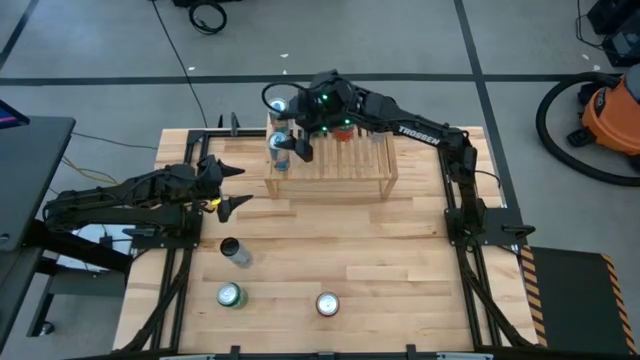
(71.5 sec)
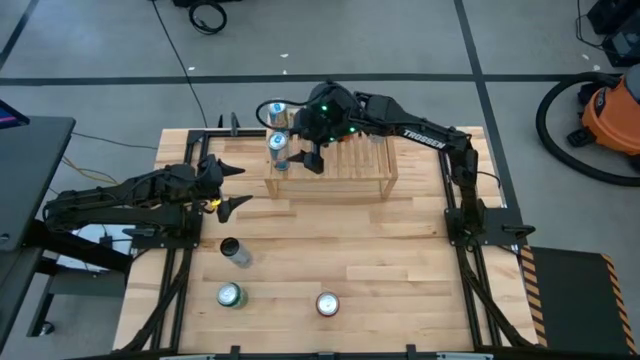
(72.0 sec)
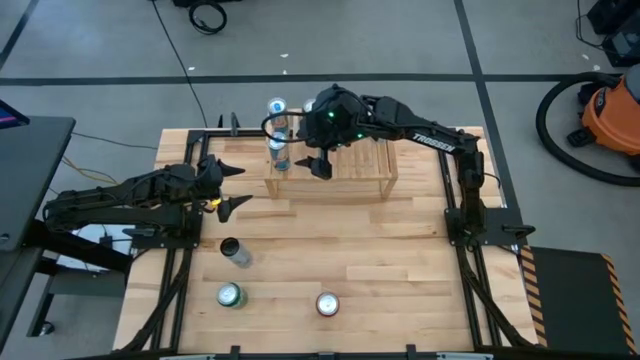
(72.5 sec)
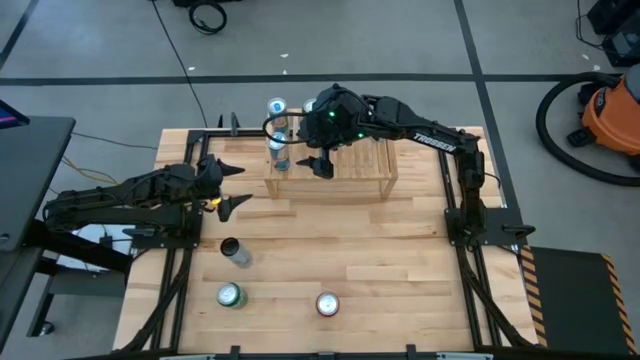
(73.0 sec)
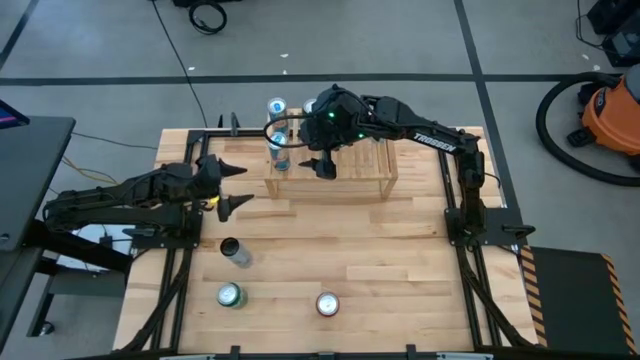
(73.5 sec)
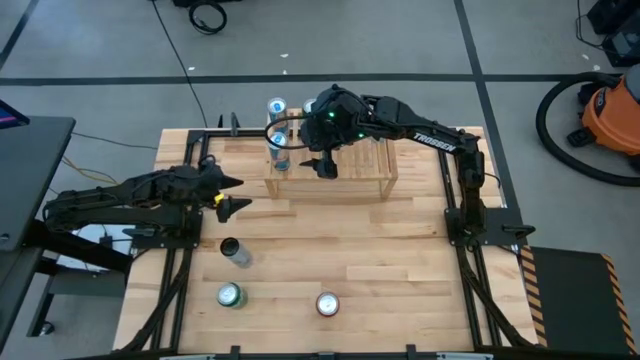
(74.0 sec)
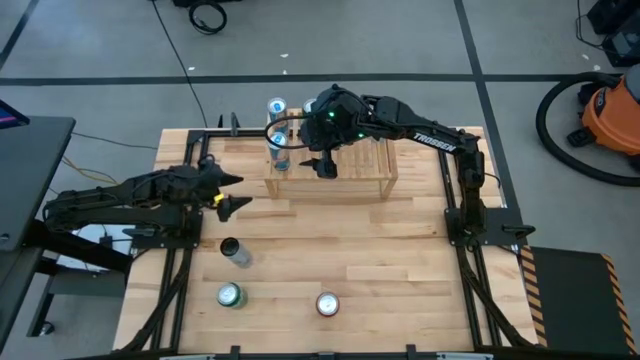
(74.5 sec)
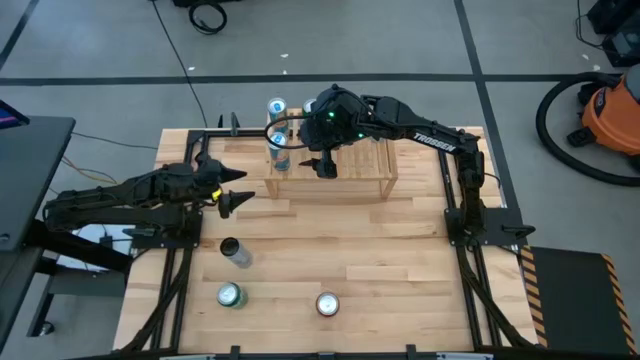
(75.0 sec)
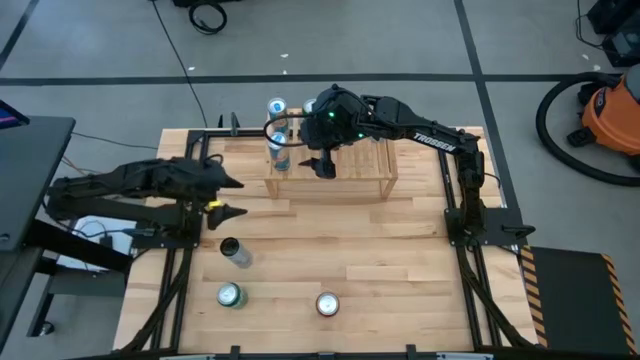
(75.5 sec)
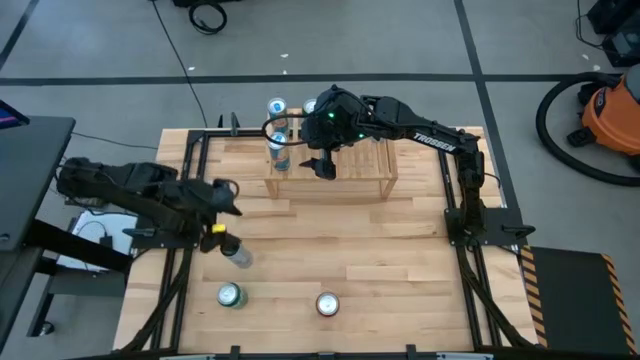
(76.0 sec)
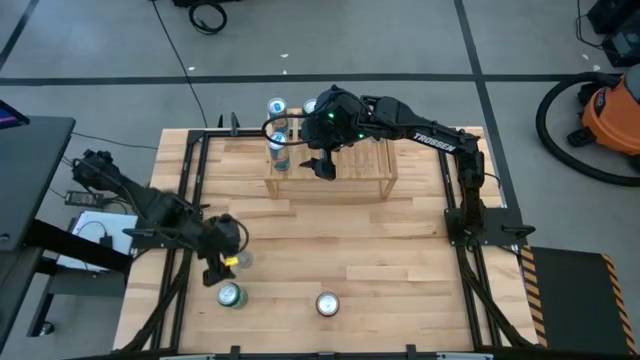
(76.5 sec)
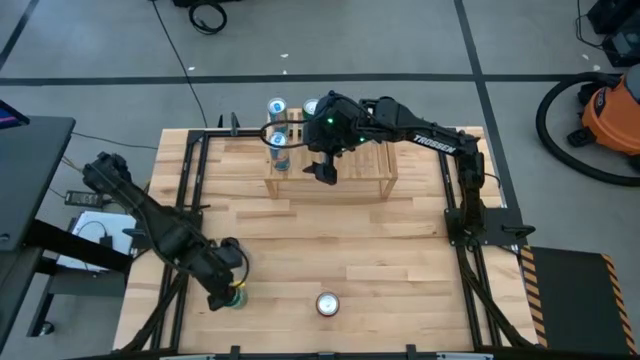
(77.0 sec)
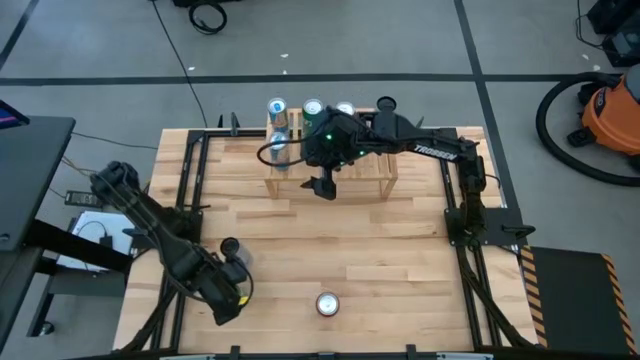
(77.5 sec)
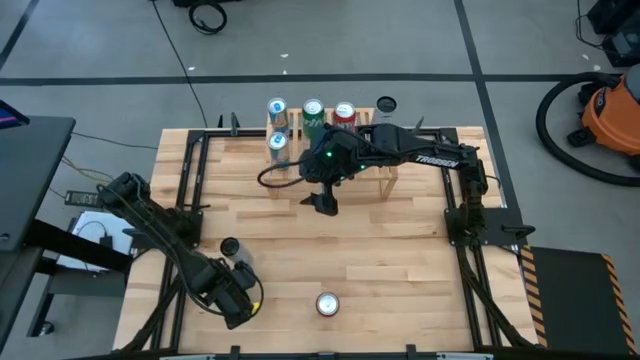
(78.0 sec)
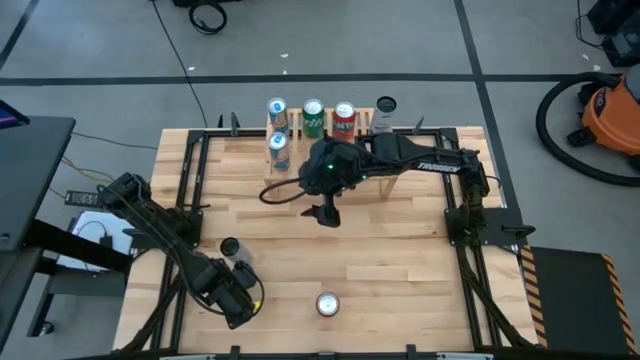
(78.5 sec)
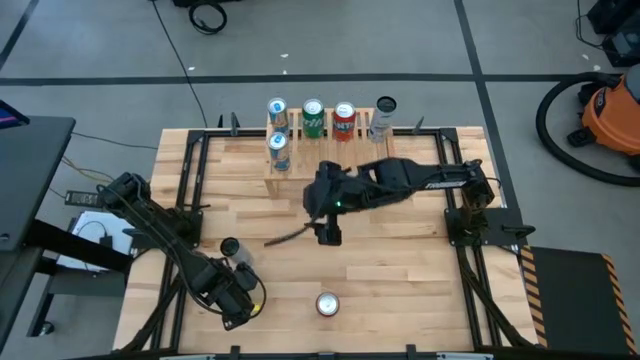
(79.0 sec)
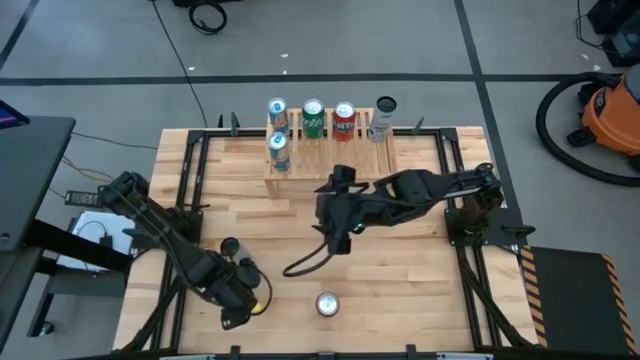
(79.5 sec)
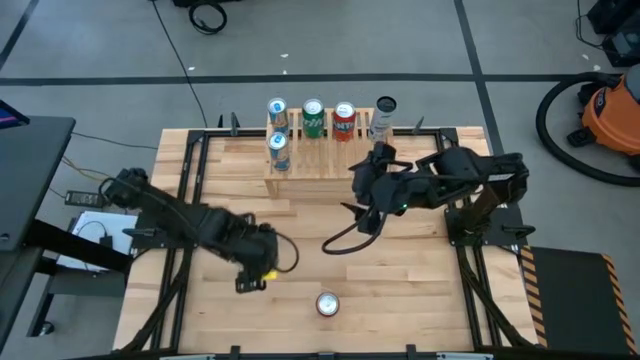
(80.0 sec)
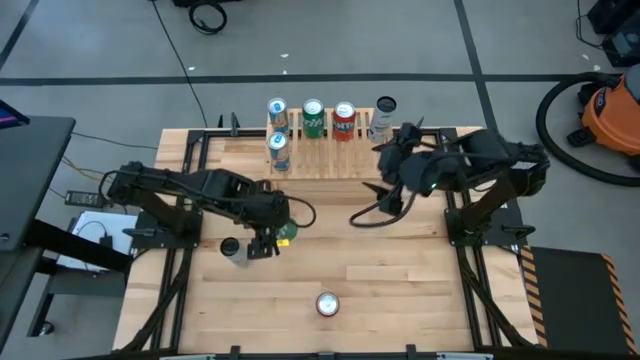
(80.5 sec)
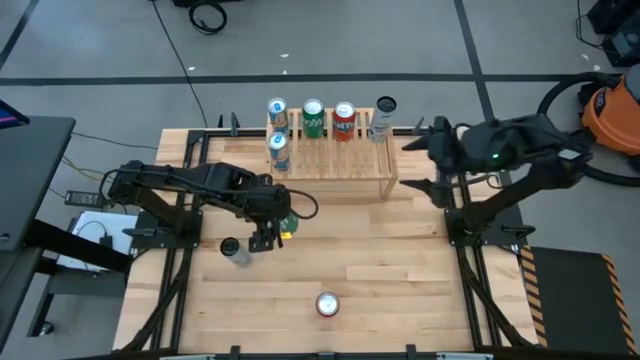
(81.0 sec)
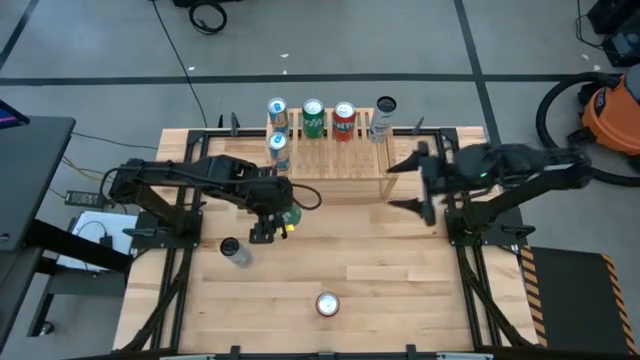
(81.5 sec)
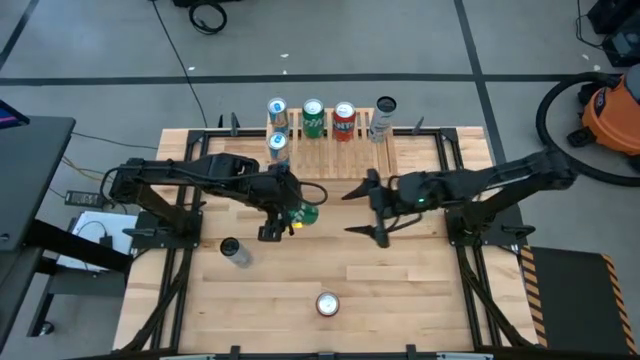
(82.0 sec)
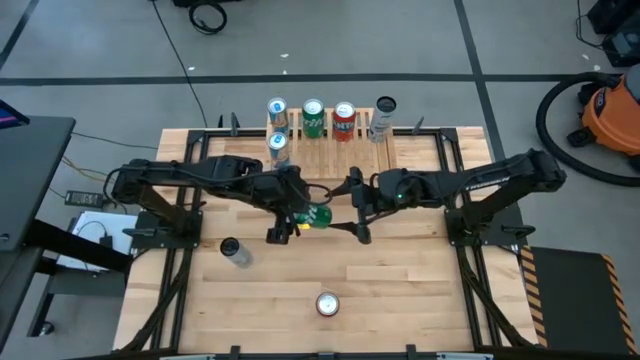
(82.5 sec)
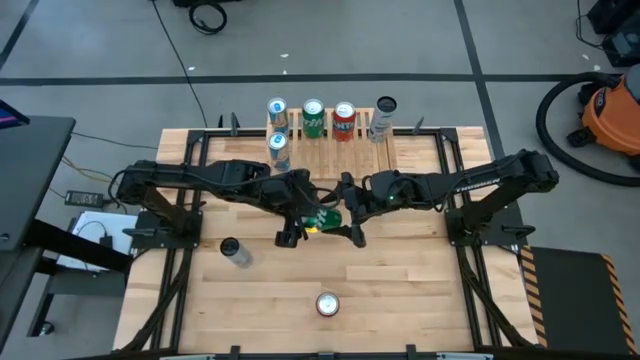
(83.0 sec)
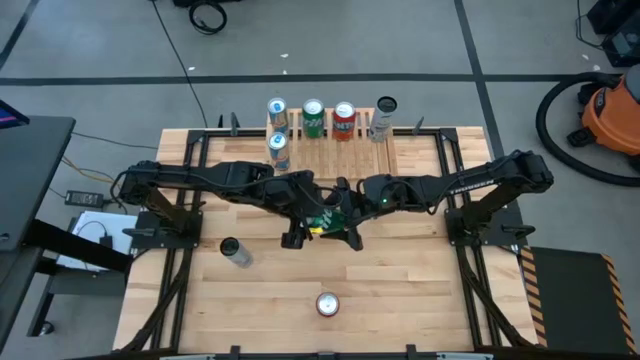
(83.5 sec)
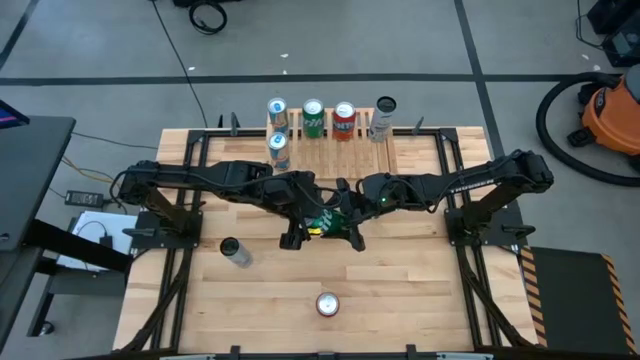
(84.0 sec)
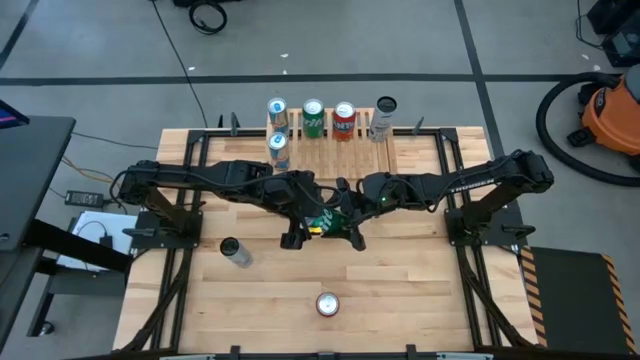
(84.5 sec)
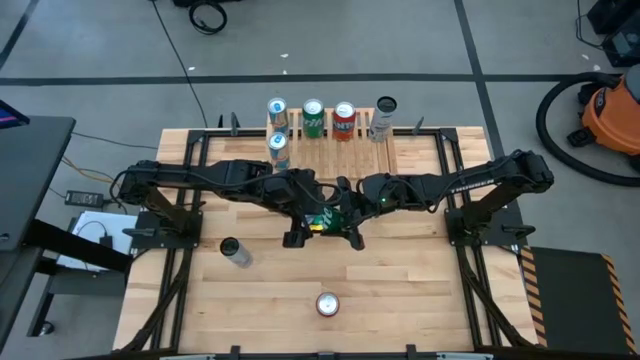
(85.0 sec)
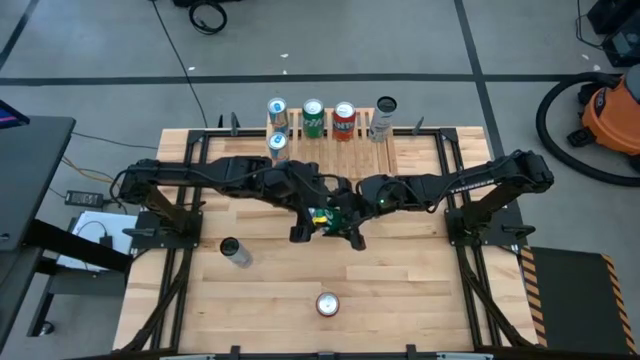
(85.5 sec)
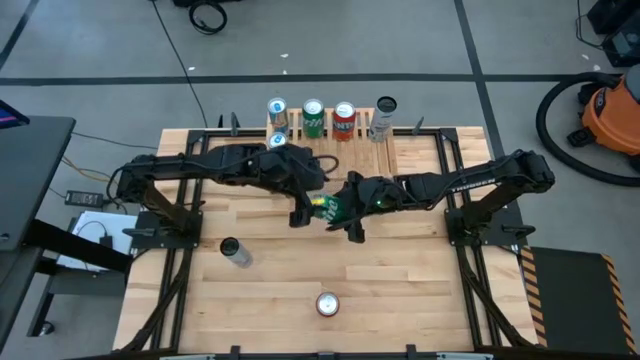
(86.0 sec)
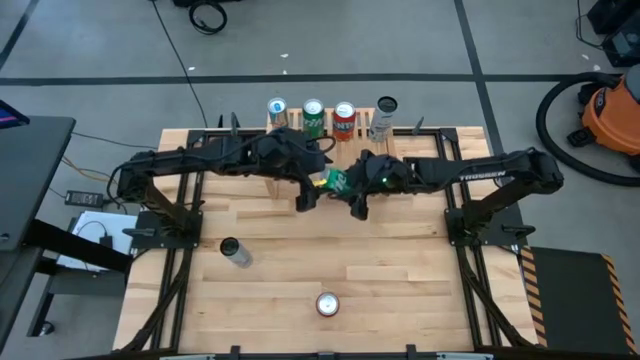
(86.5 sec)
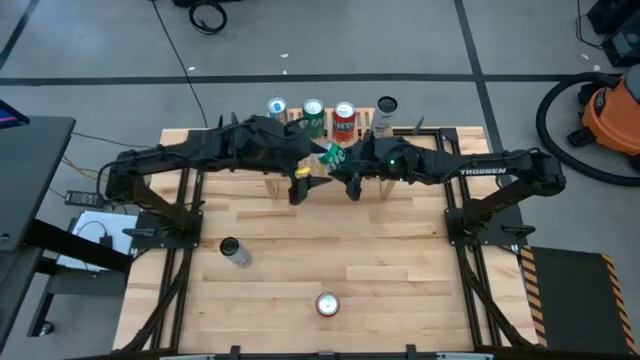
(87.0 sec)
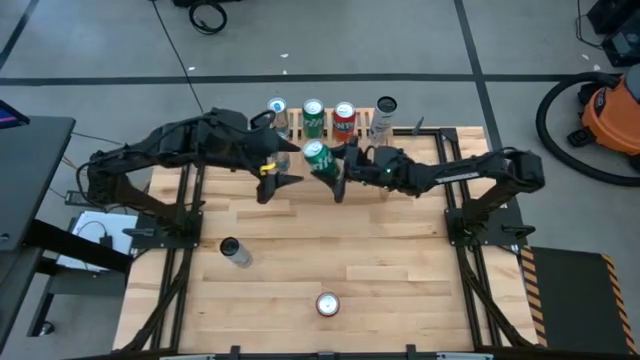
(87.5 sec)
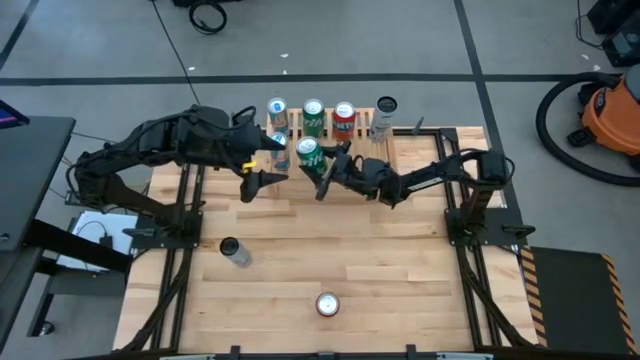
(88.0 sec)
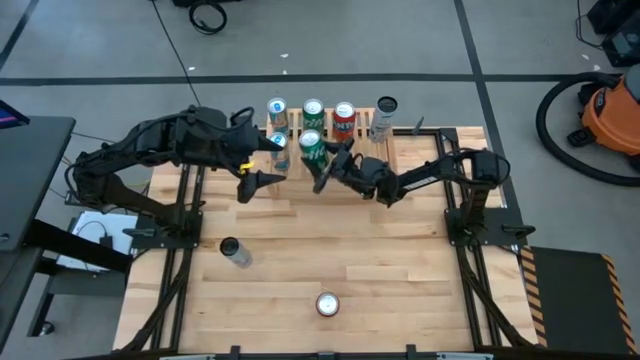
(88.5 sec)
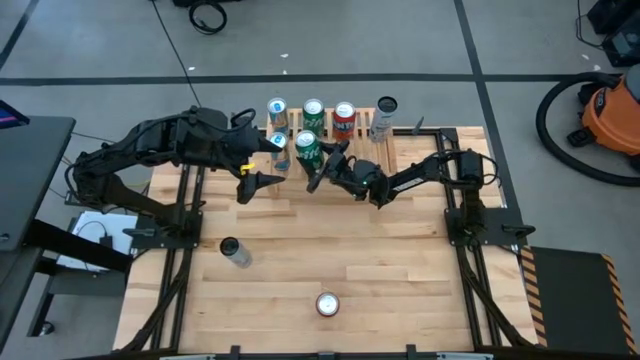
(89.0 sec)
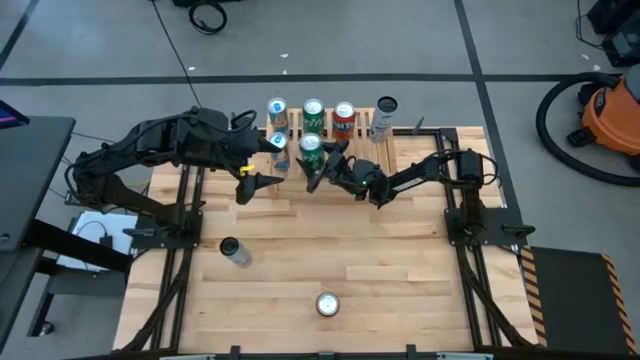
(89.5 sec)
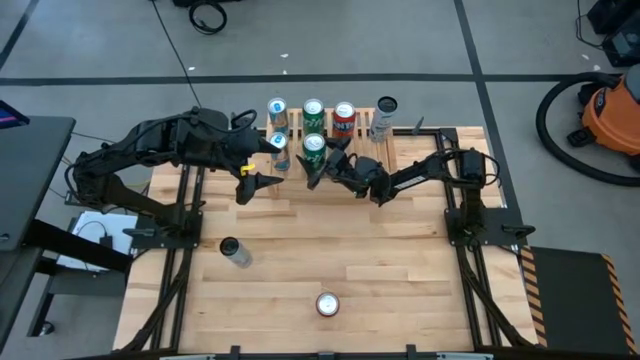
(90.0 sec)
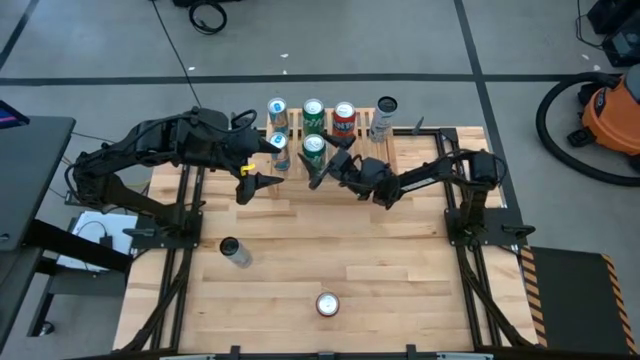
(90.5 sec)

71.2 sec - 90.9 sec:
Task: Place canned beverage on shelf
Put the green soda can on the shelf aligned with the other green soda can

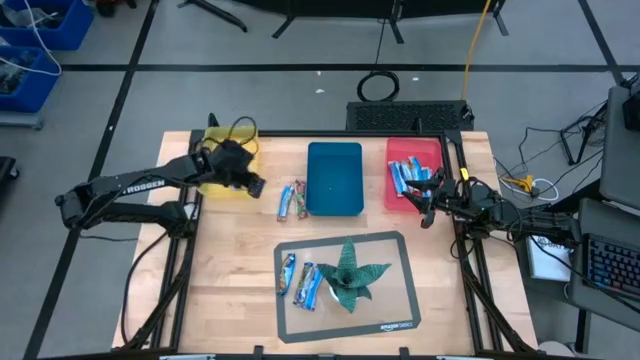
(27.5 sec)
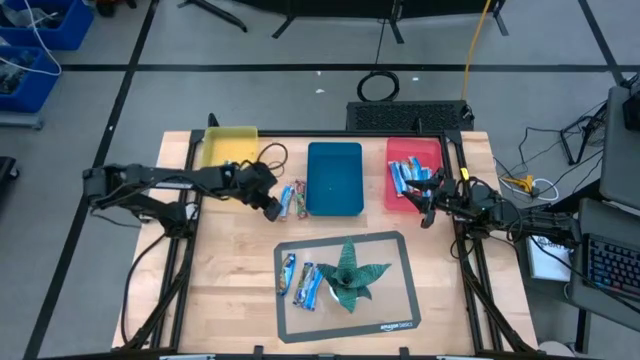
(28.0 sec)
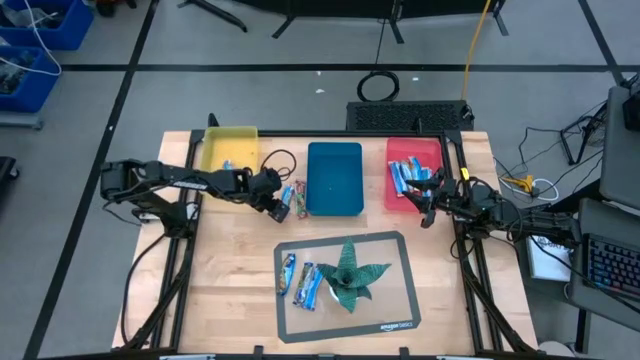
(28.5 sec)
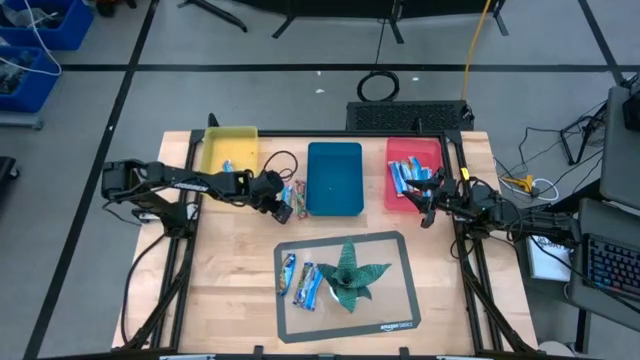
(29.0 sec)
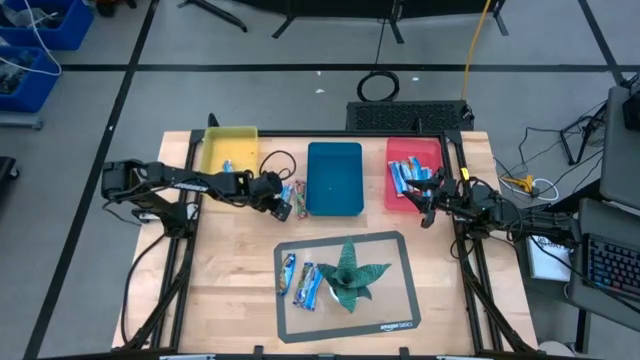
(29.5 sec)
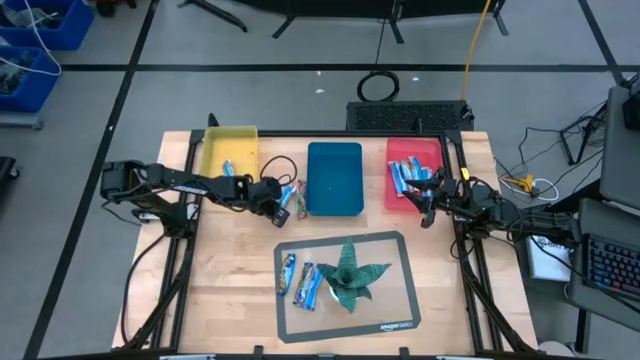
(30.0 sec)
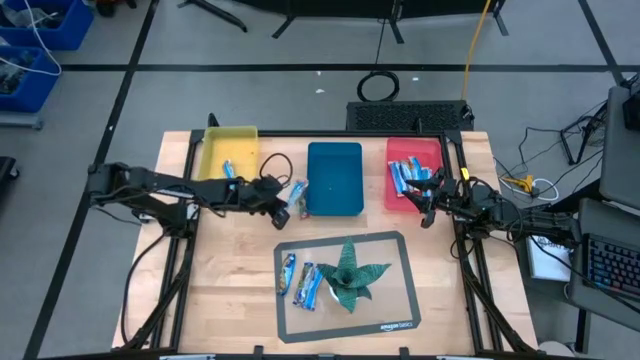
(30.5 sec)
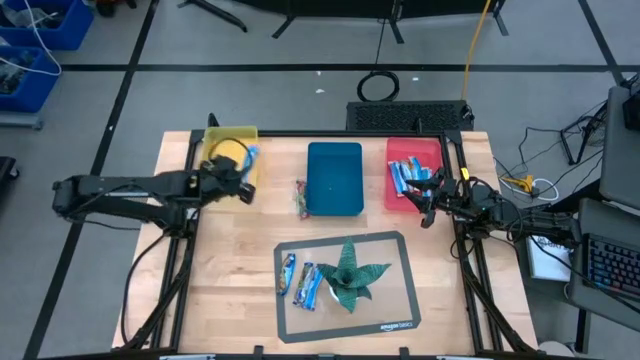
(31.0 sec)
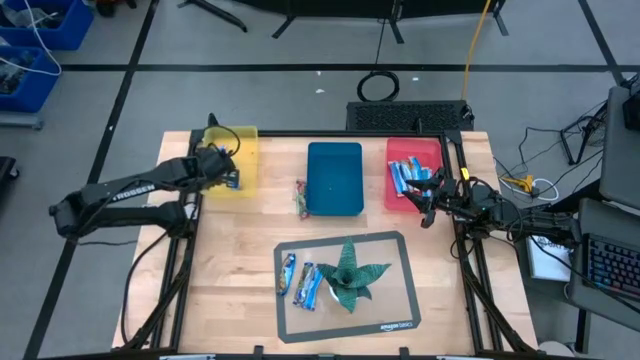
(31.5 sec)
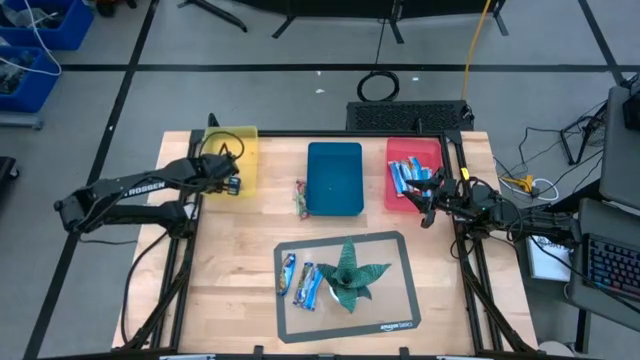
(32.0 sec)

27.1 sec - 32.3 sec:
Task: Pick and place Granola Bars by type
Put the red granola bar into the yellow bin
